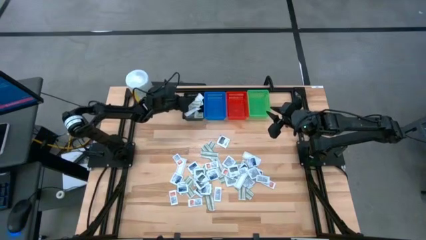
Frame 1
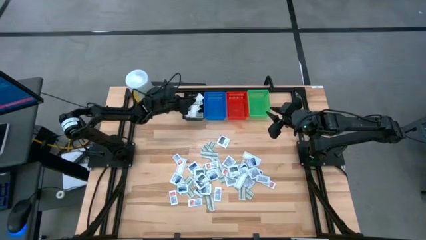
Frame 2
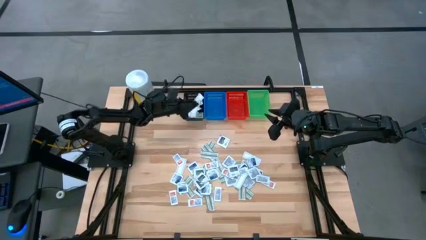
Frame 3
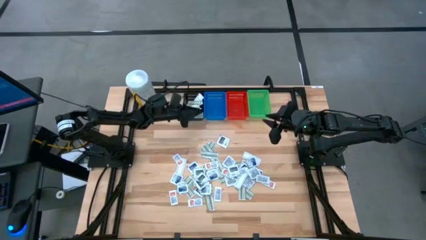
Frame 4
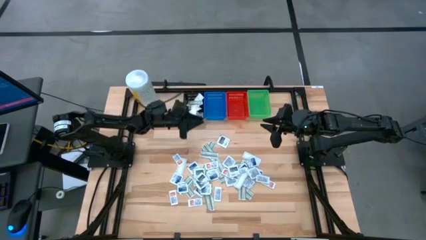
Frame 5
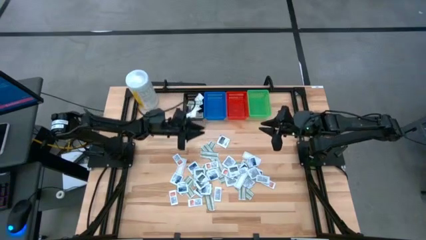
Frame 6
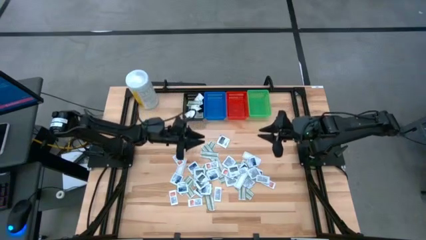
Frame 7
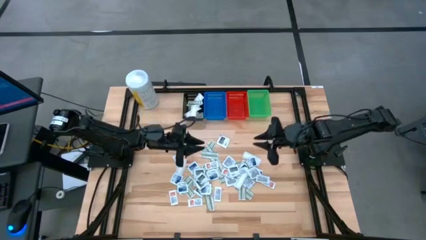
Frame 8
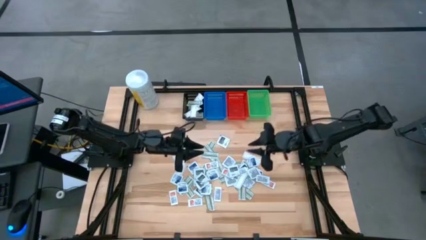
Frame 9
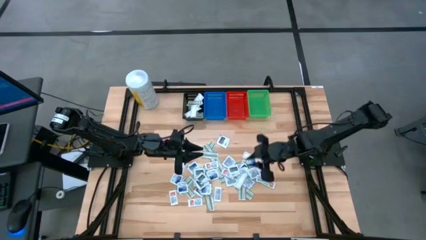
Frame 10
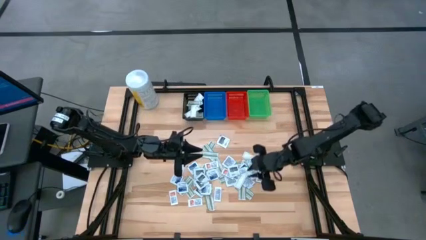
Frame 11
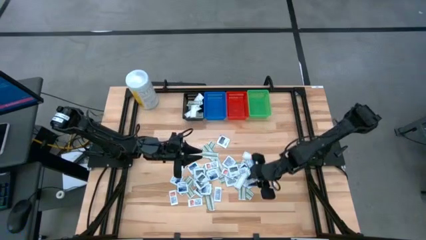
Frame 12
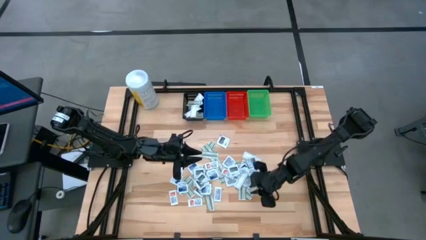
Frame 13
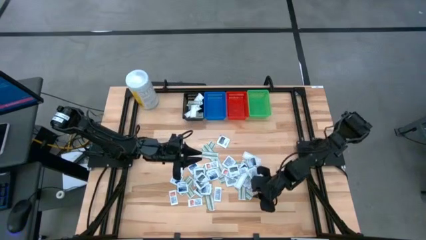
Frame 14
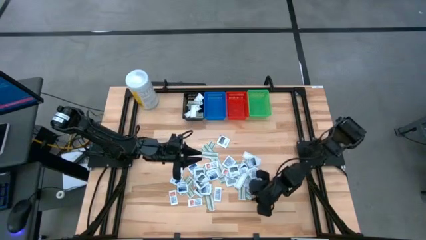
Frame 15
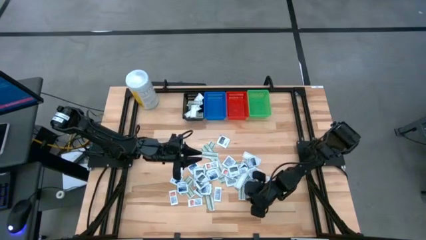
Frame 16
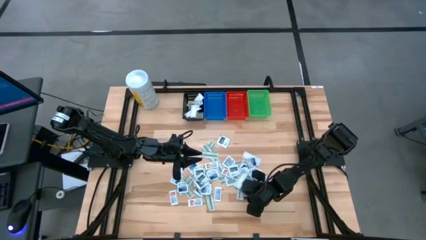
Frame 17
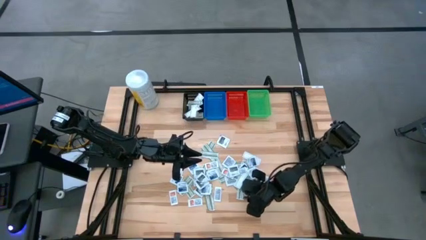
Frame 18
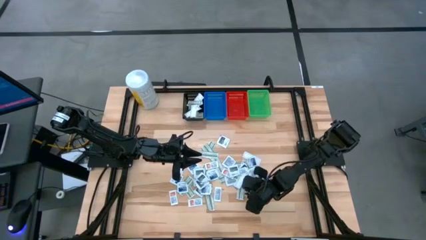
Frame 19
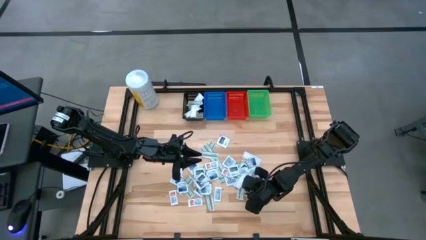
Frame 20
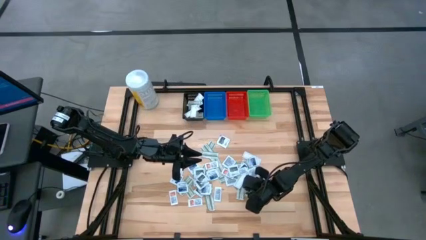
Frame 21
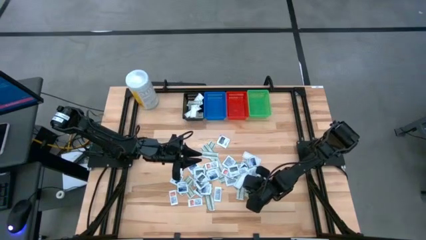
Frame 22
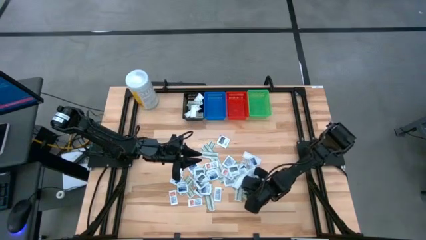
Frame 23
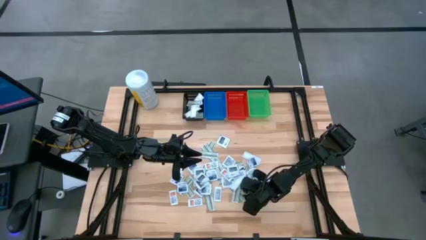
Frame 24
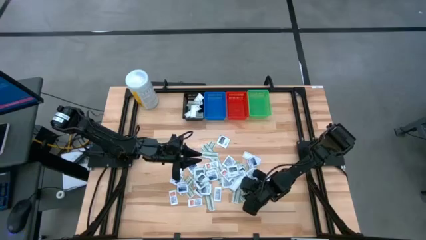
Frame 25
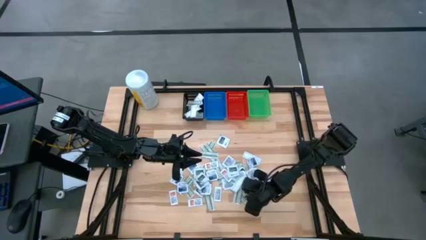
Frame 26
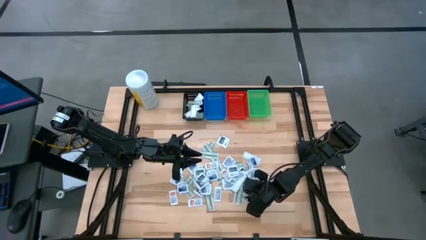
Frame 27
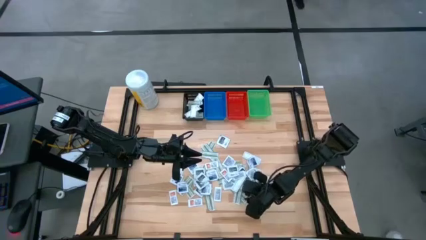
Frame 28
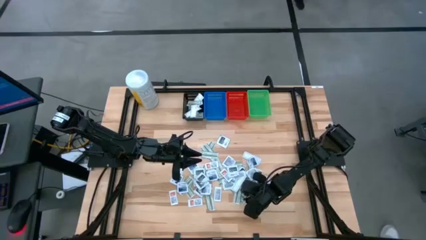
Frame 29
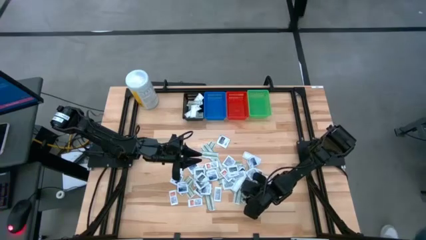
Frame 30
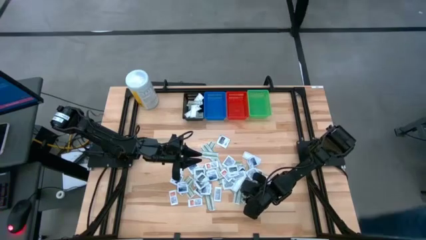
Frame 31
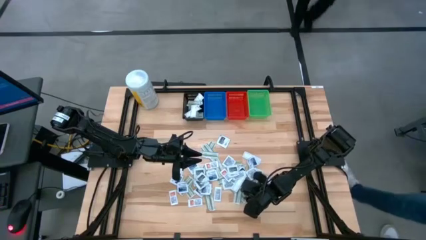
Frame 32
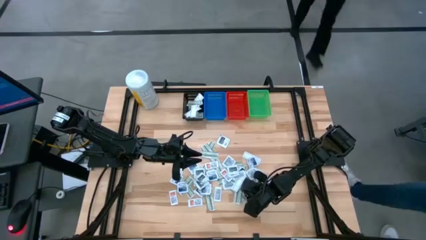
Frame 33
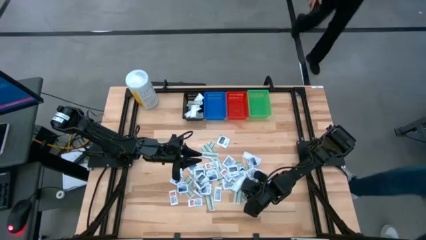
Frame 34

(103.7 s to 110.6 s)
Task: Pick & Place First Aid Supplies
Put the green bandage pack in the black bin

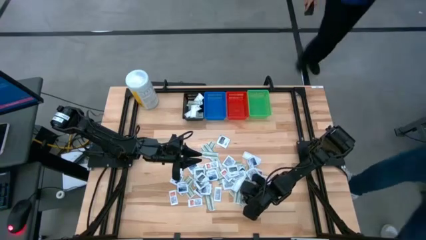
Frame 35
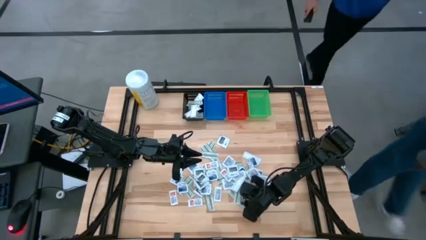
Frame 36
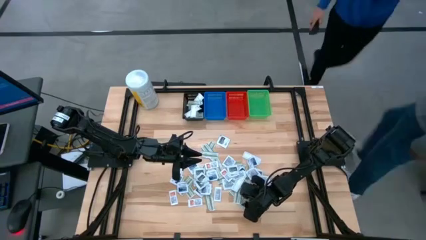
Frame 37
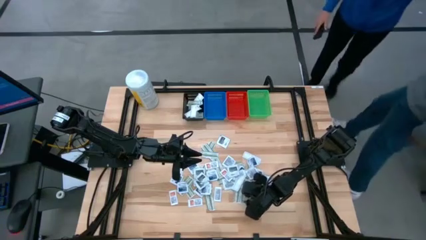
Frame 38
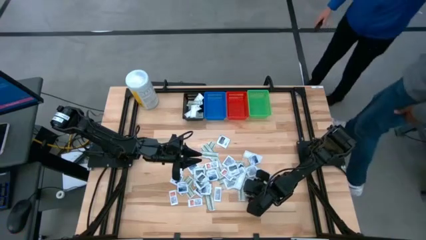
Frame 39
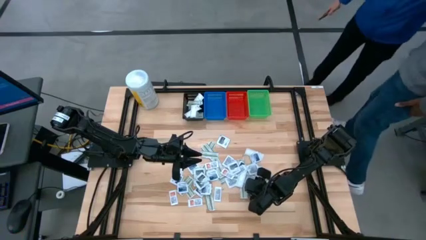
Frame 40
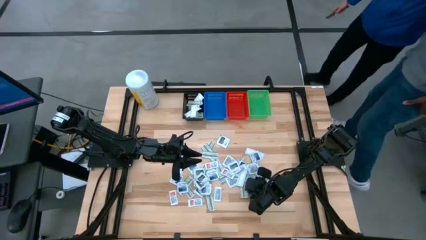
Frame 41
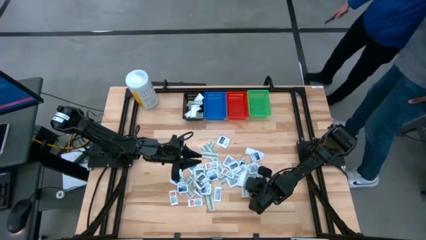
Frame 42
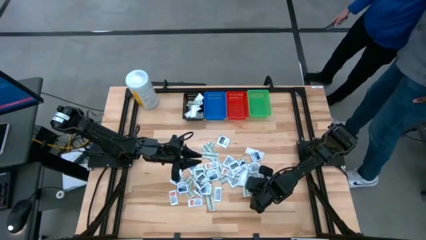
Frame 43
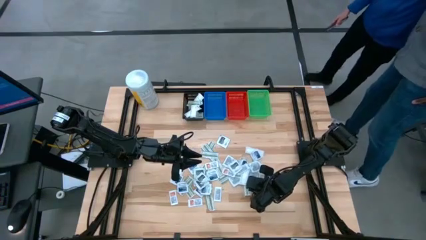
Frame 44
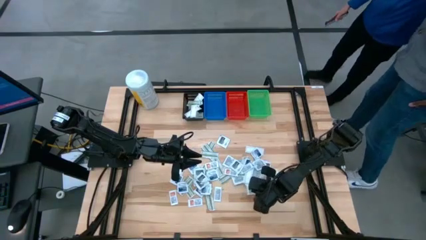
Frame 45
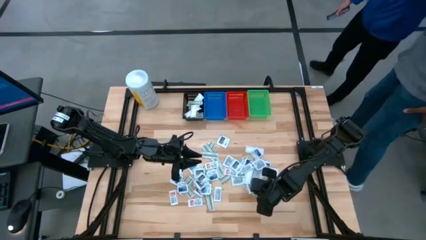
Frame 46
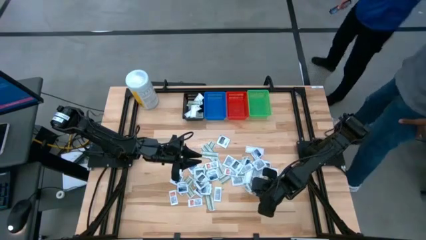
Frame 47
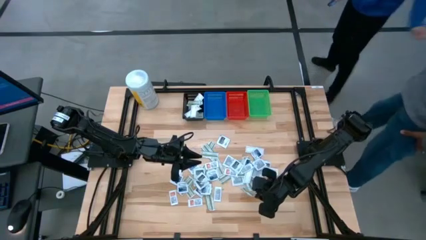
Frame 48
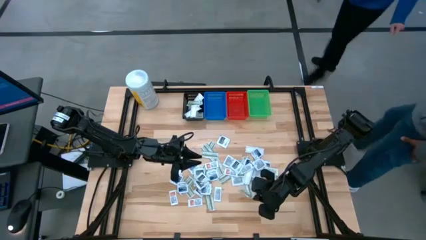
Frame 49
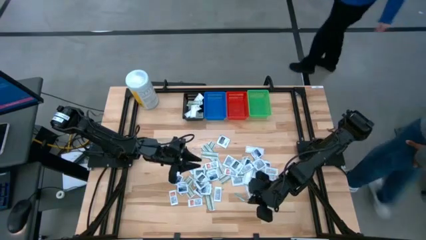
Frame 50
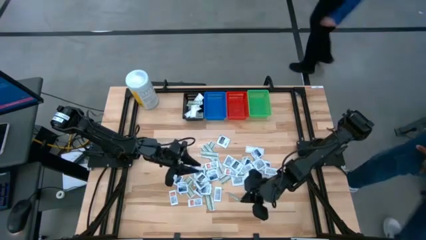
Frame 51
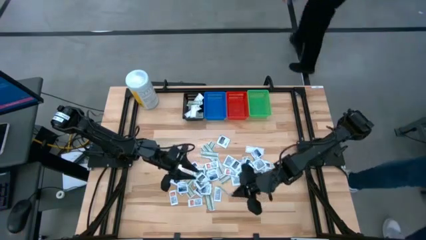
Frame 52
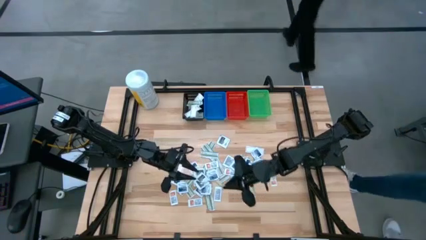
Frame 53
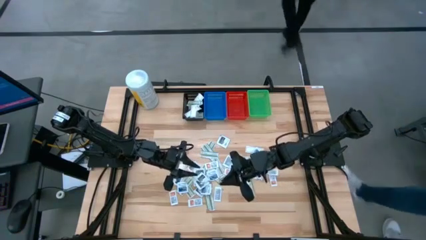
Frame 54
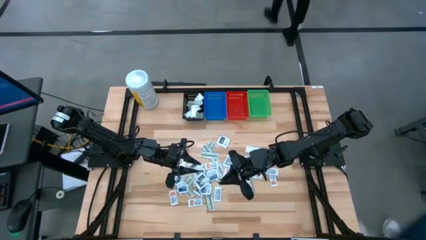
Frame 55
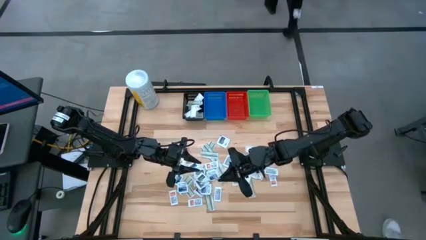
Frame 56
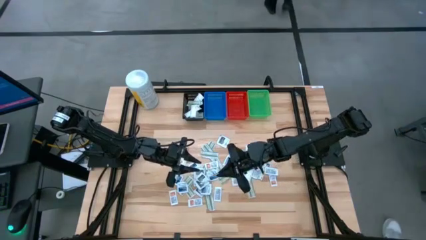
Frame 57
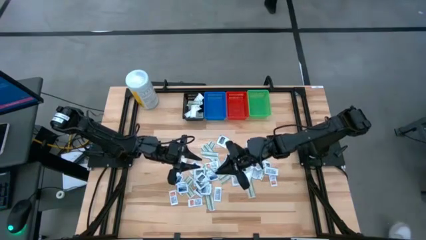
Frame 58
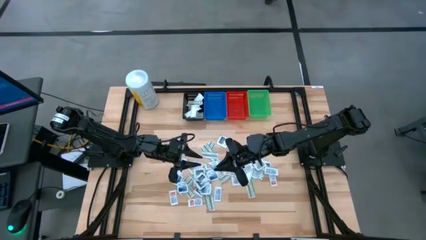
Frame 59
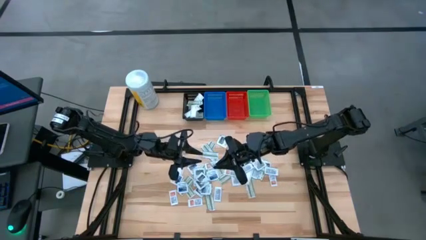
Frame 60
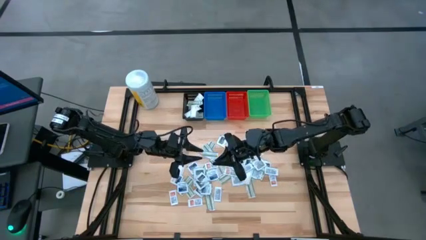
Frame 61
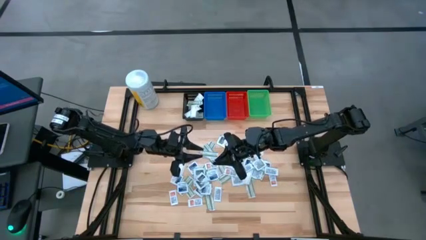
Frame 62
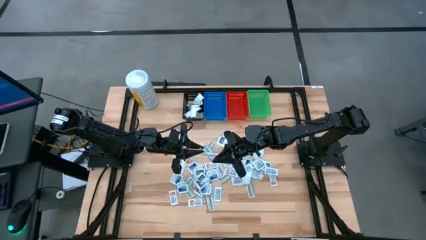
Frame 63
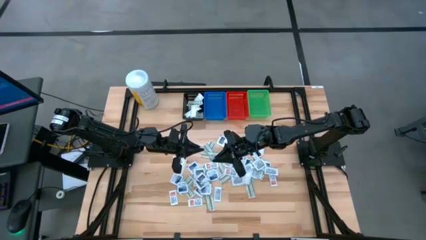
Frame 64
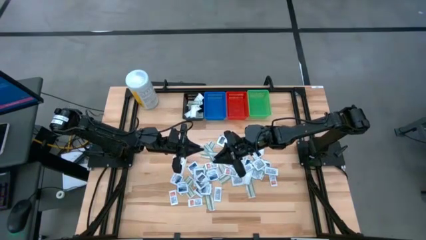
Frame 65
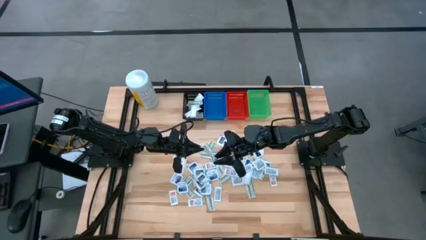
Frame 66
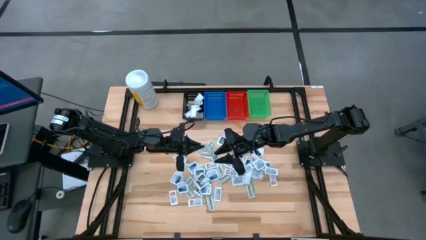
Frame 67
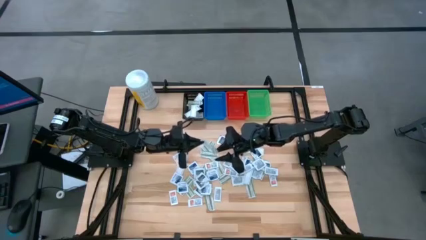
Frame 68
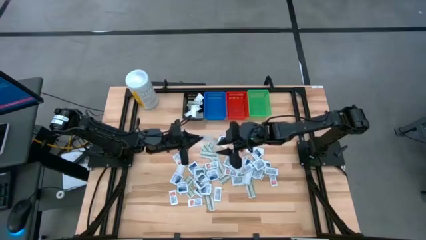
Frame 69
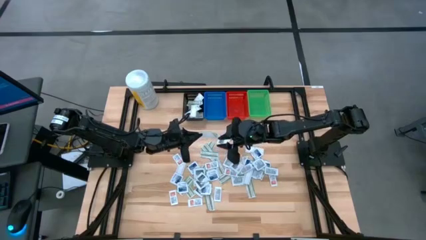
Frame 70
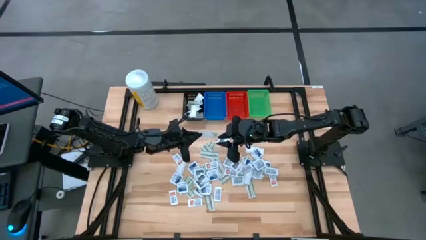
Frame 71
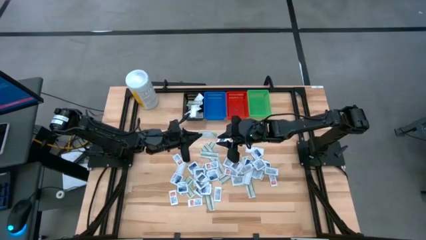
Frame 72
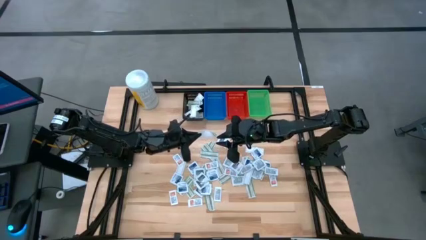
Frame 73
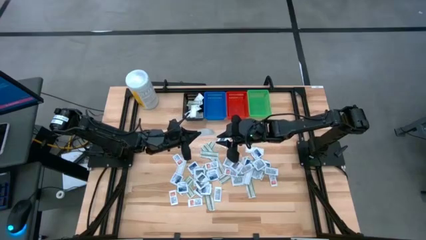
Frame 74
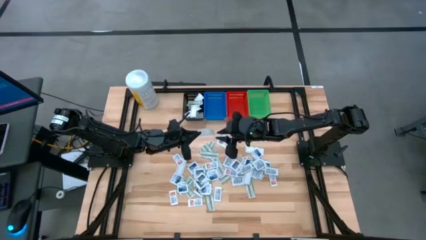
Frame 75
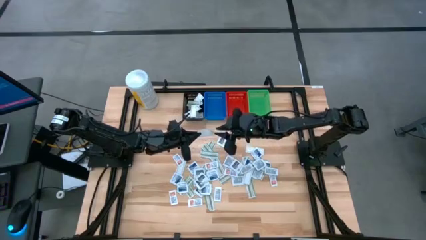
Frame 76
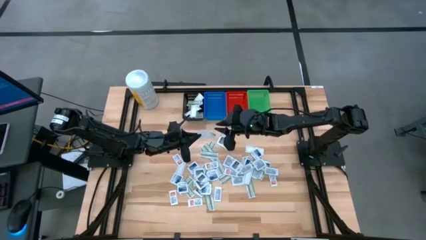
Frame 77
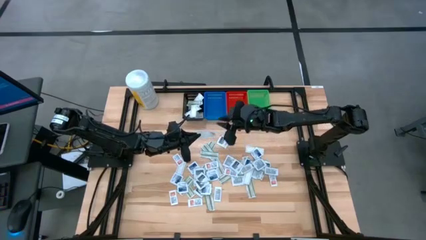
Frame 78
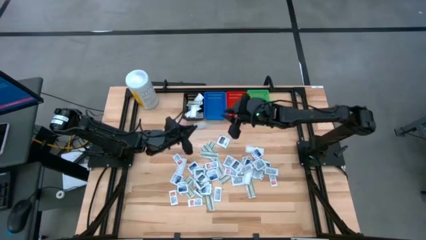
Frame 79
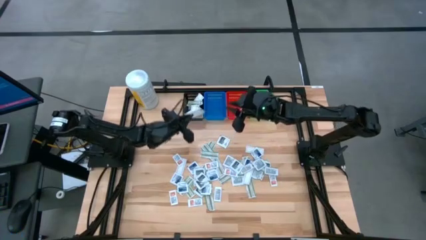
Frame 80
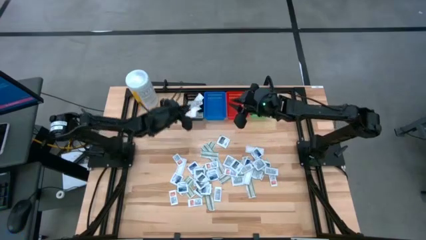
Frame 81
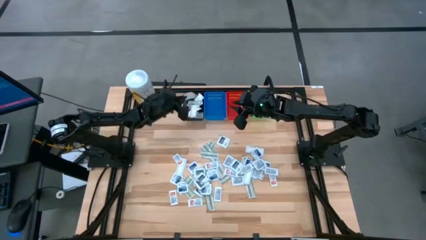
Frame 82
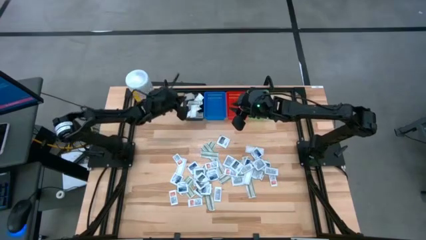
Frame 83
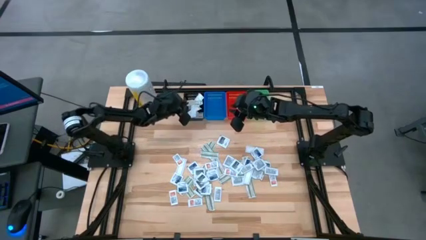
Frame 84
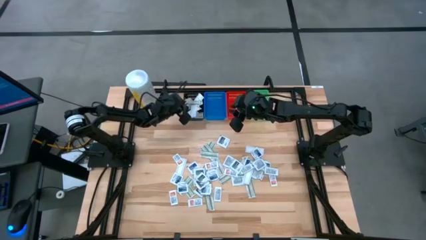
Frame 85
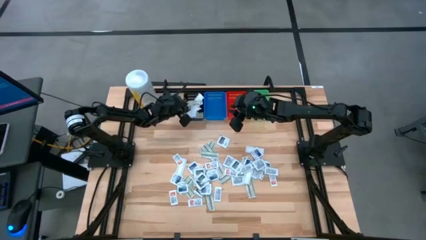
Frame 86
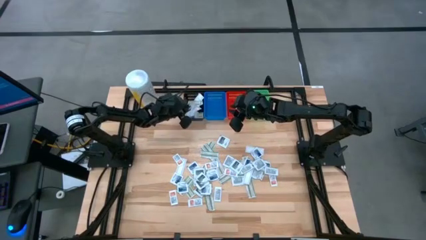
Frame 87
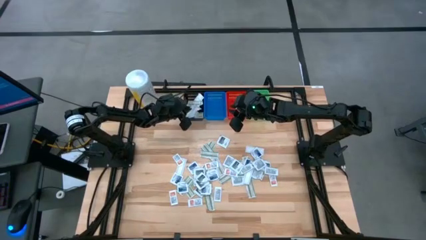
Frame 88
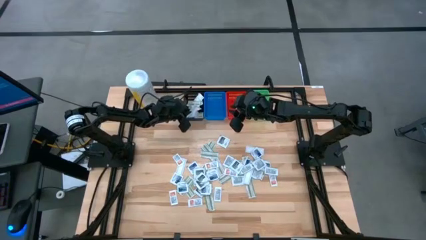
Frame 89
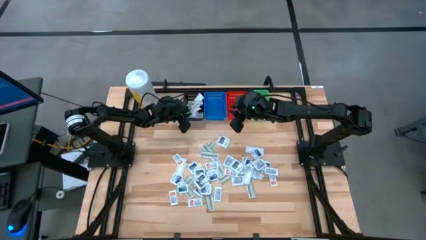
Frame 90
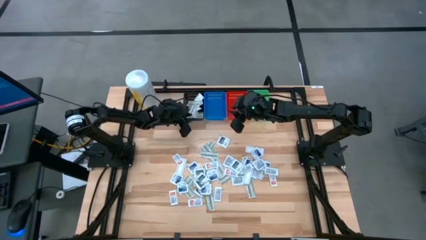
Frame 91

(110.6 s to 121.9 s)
Put the green bandage pack in the black bin
